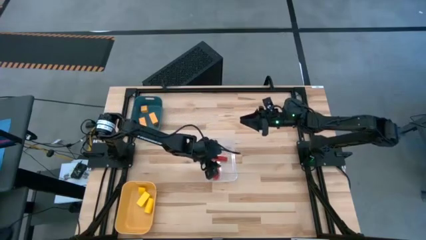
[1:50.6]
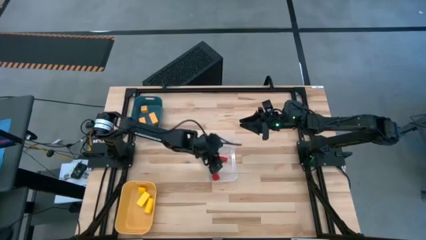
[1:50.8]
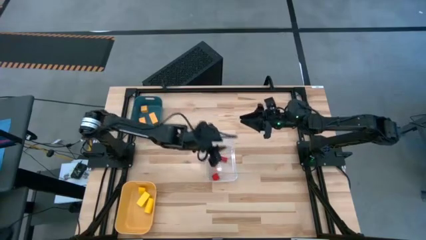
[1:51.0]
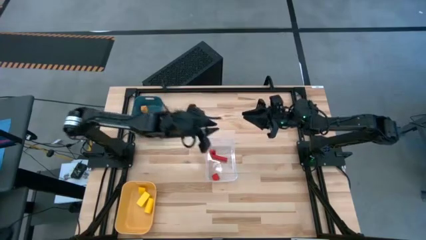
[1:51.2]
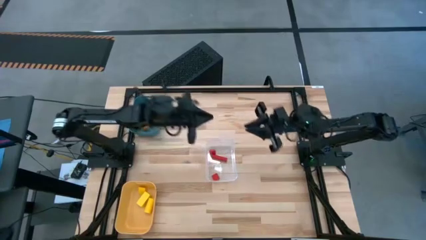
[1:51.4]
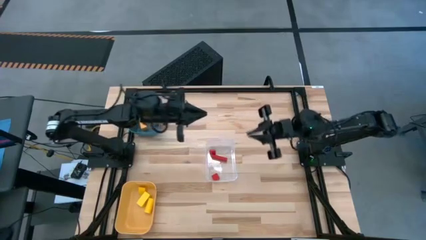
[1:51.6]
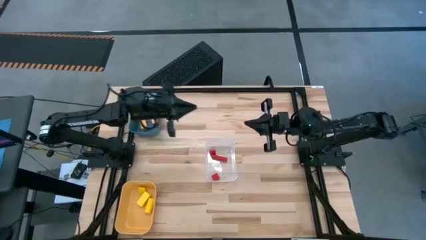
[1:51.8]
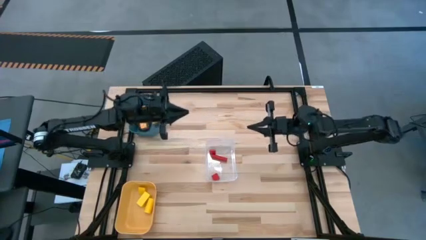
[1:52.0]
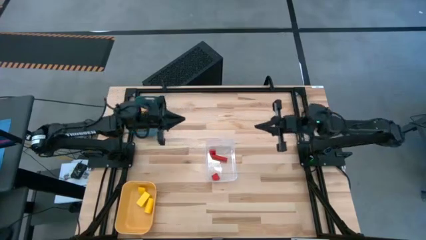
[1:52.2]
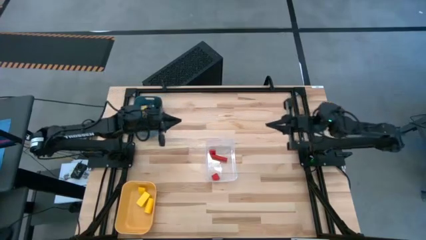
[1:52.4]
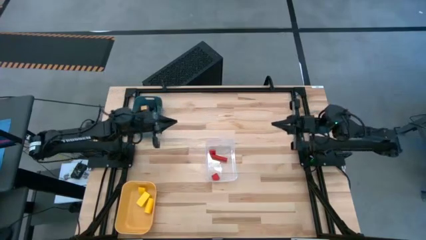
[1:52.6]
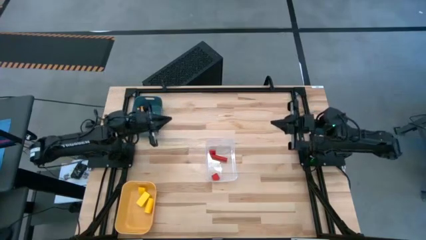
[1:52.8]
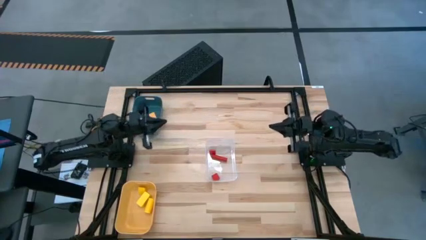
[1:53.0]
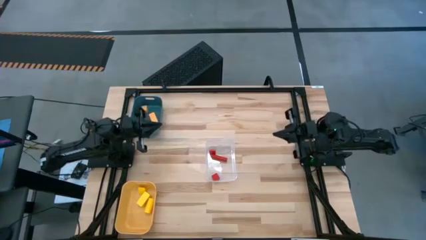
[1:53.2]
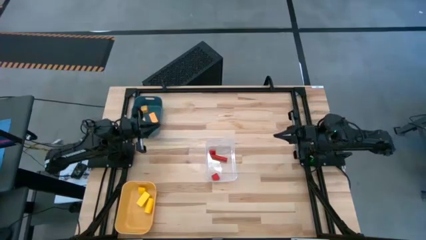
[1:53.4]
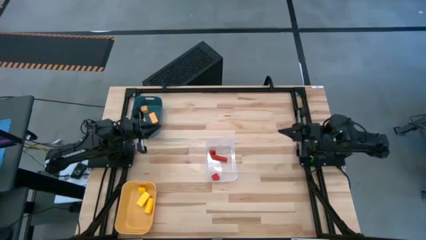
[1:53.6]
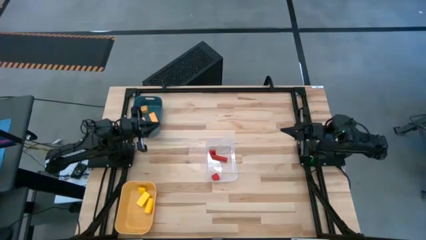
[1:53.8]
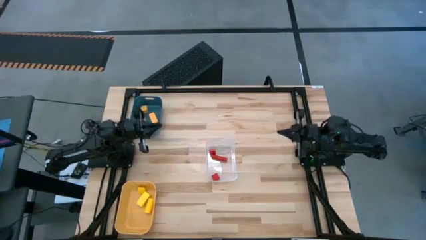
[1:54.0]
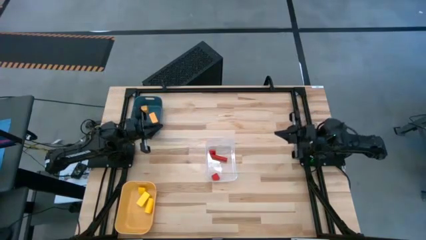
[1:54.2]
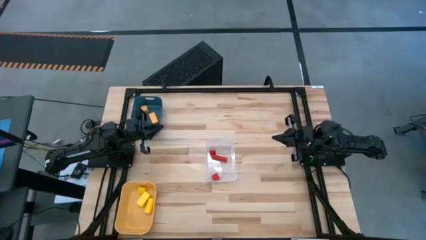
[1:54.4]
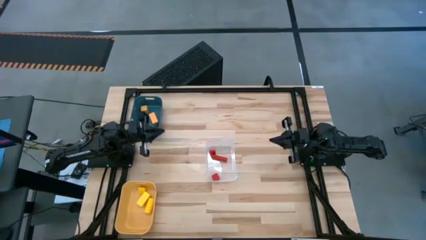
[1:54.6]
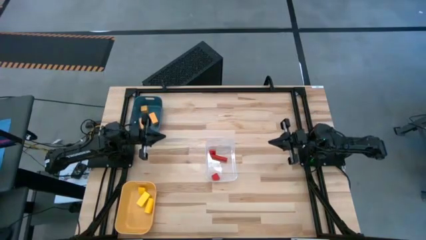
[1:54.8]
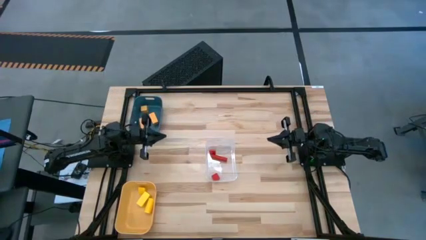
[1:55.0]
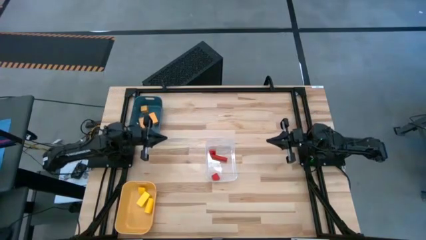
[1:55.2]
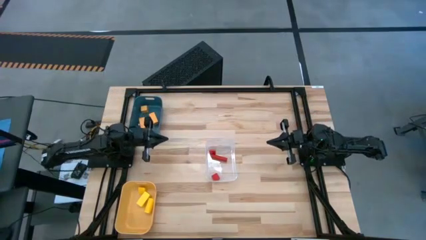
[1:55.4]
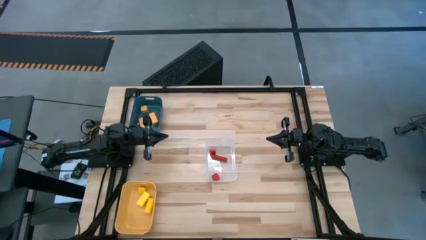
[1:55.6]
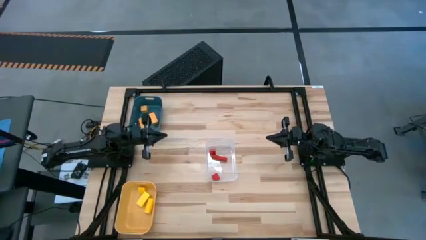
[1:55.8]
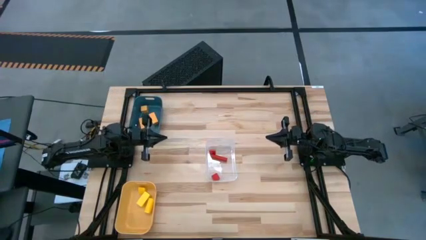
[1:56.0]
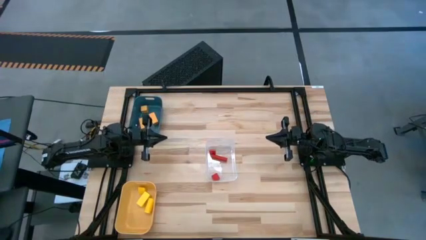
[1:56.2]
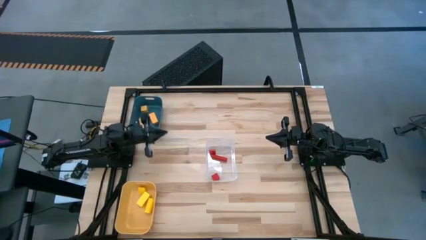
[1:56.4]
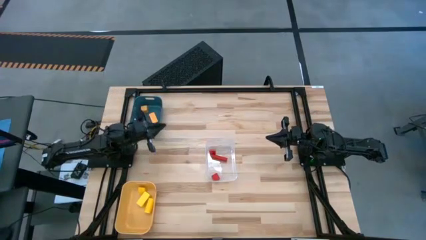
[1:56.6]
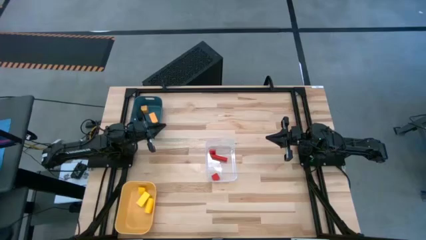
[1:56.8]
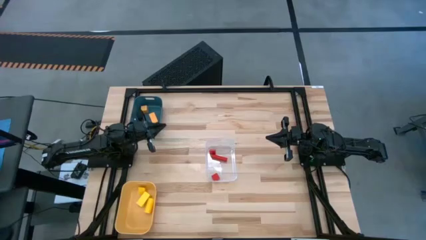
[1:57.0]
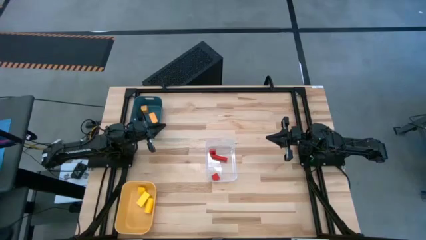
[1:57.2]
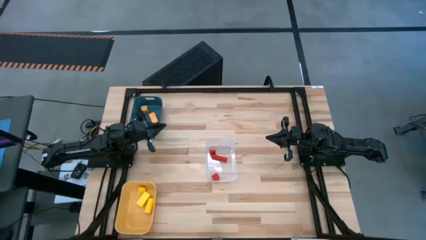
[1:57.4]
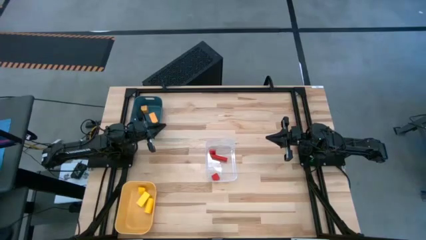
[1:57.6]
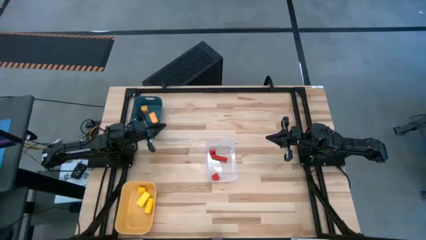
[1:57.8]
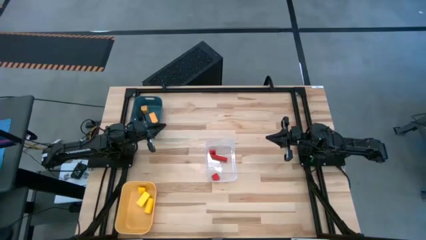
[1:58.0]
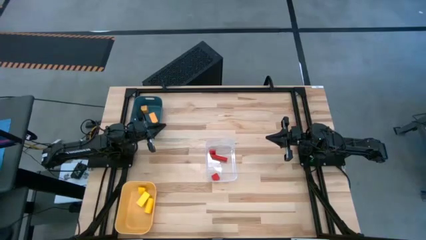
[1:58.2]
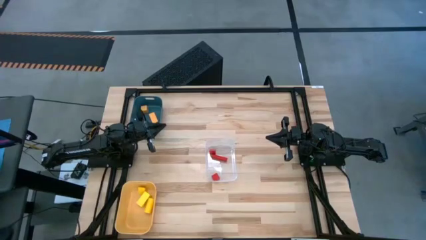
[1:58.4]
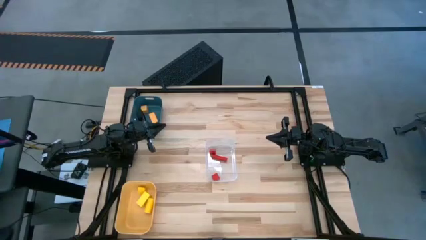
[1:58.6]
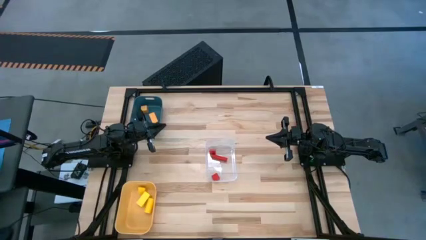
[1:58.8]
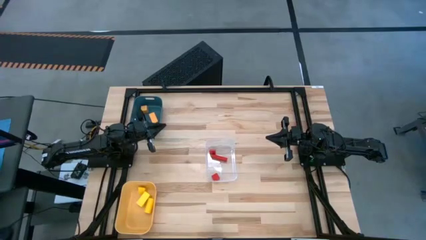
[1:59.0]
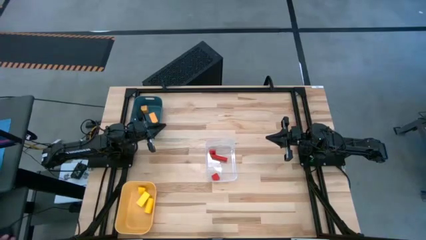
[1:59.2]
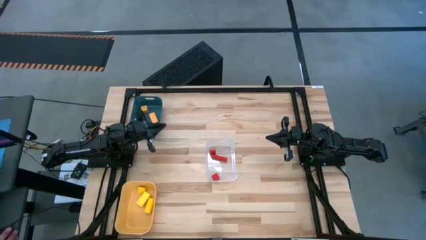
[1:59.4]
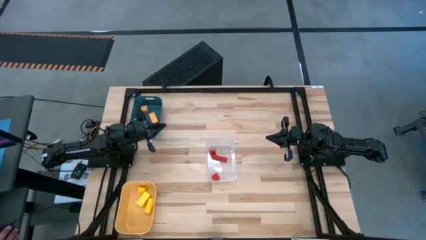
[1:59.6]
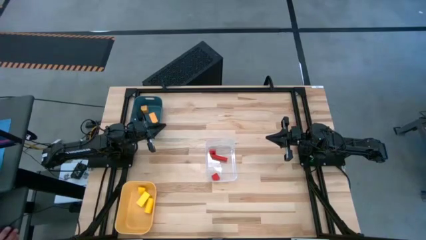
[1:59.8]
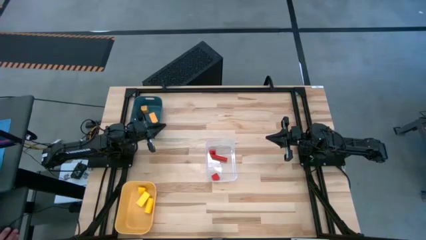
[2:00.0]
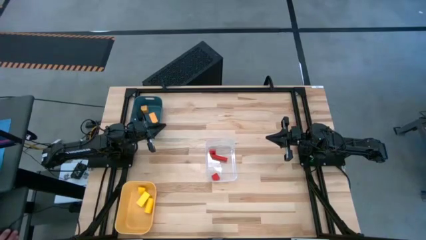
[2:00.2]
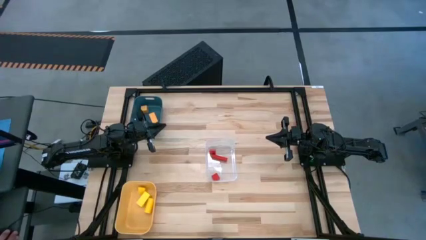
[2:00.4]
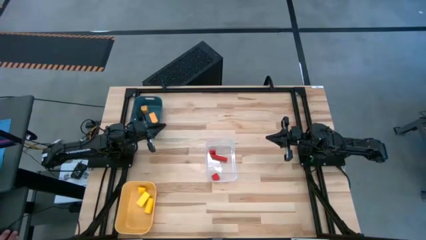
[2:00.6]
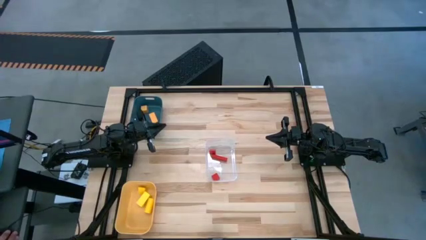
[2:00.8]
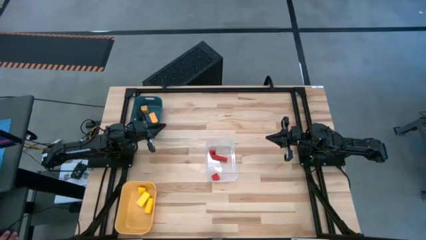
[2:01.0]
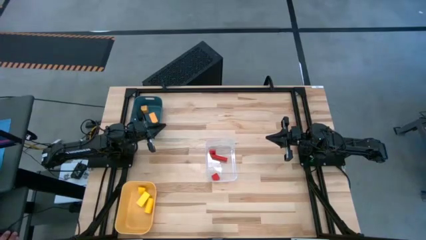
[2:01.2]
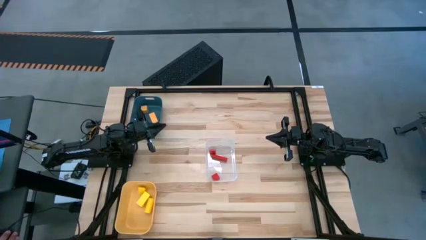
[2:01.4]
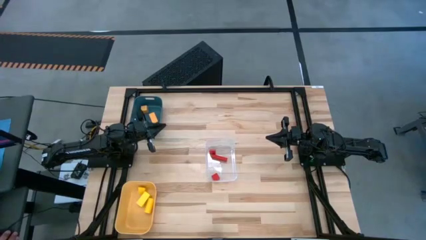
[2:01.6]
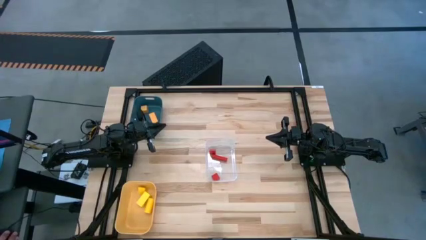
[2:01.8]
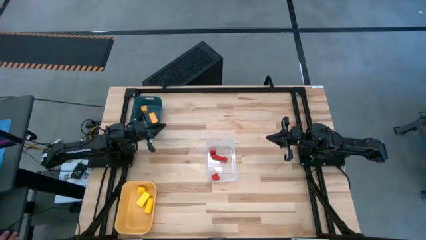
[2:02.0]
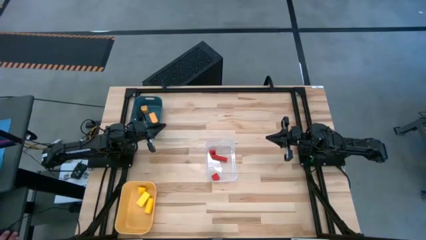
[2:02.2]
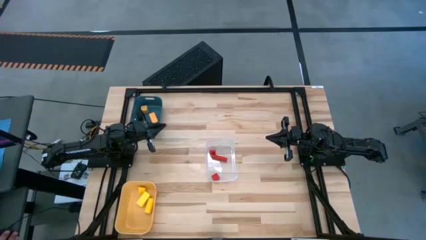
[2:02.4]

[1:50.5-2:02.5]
Task: Sort & place blocks by color
Return to Home Position

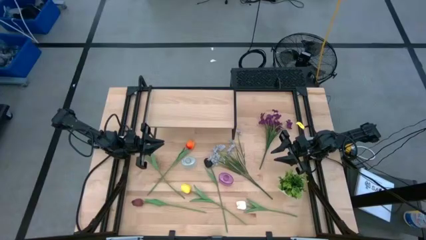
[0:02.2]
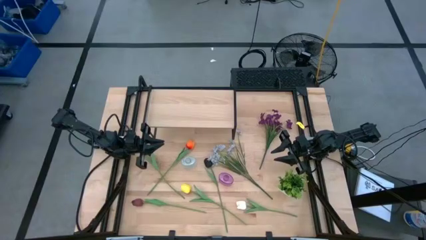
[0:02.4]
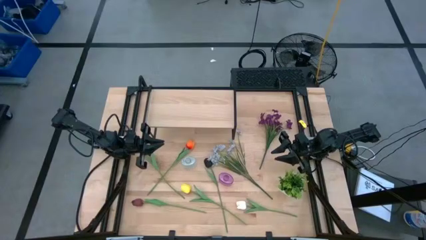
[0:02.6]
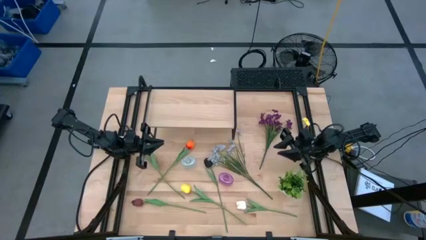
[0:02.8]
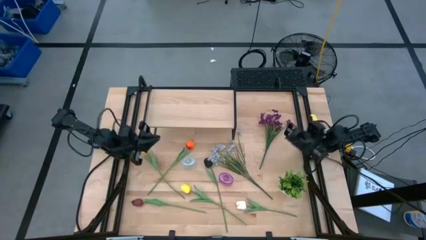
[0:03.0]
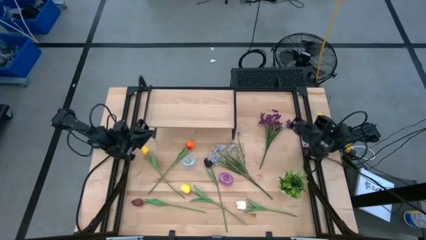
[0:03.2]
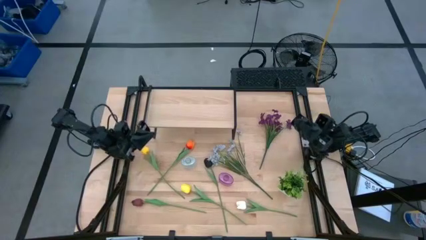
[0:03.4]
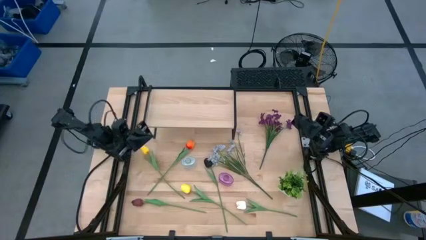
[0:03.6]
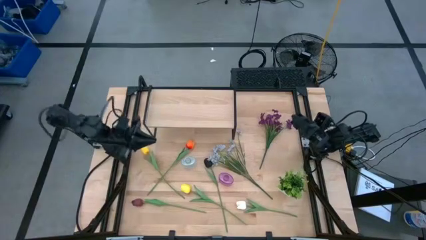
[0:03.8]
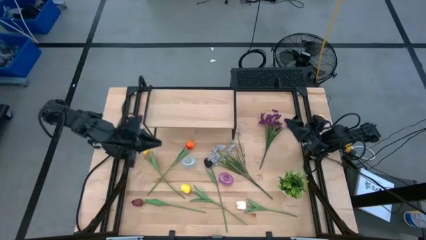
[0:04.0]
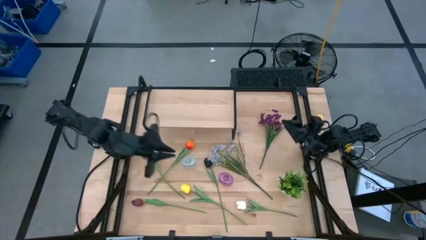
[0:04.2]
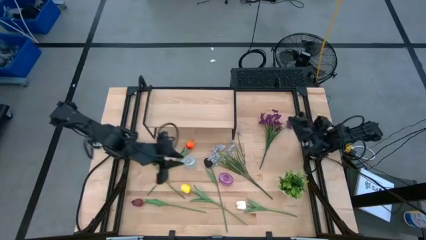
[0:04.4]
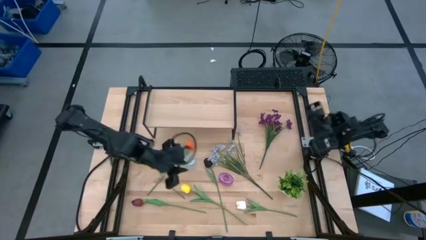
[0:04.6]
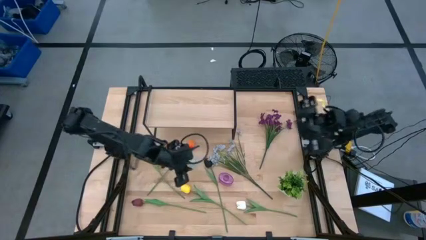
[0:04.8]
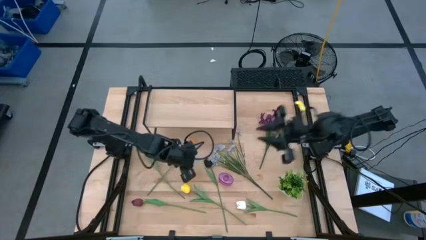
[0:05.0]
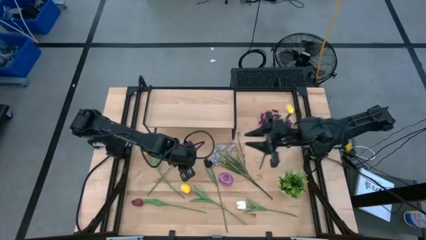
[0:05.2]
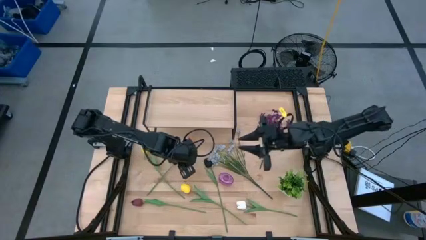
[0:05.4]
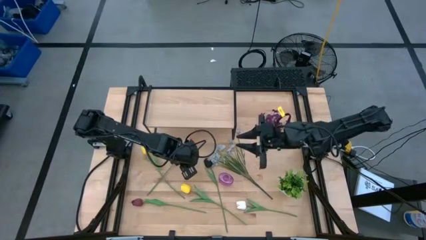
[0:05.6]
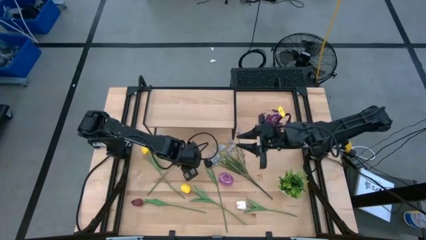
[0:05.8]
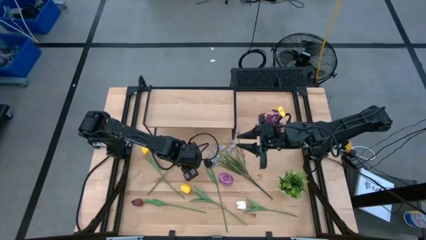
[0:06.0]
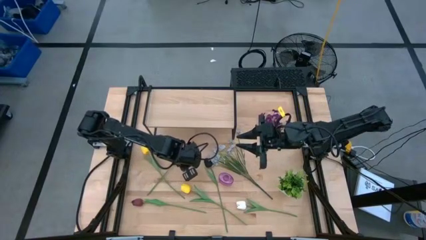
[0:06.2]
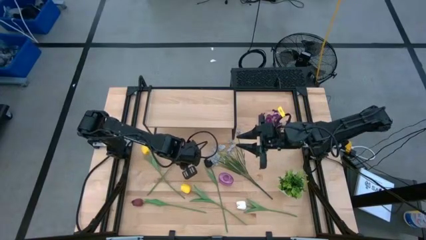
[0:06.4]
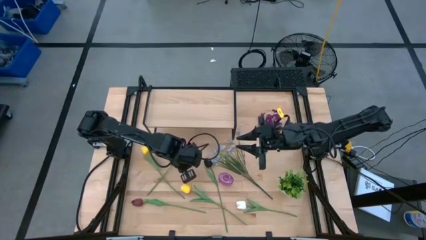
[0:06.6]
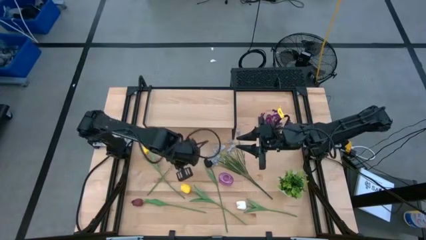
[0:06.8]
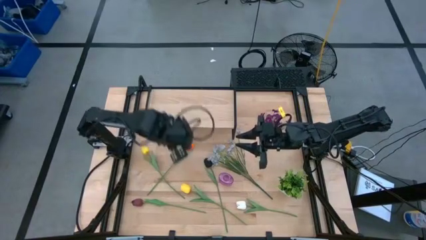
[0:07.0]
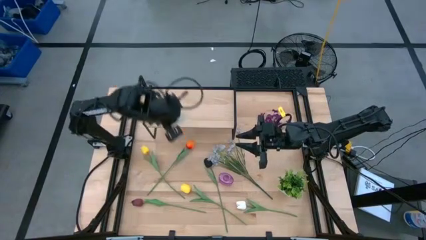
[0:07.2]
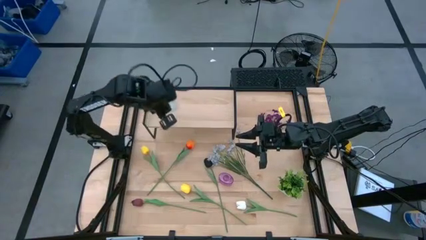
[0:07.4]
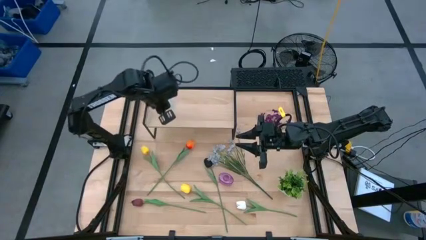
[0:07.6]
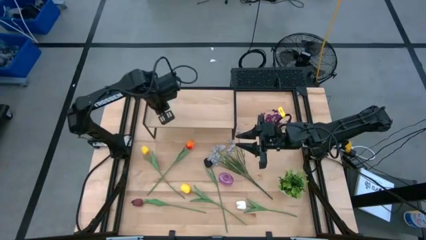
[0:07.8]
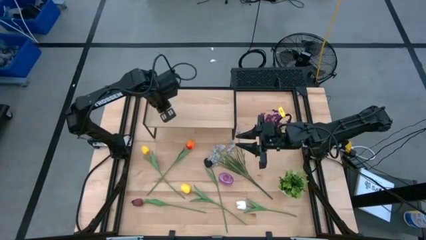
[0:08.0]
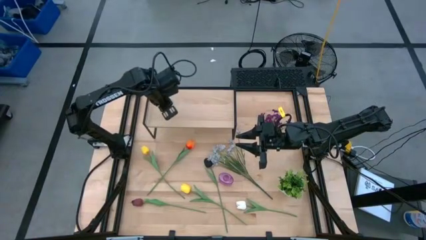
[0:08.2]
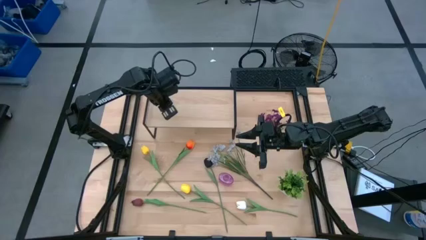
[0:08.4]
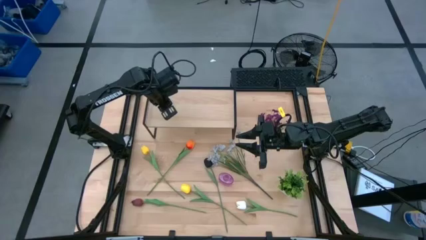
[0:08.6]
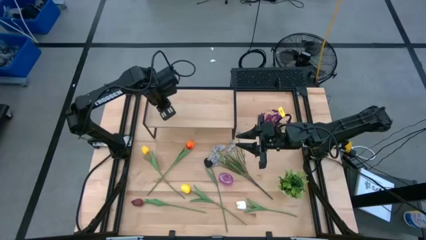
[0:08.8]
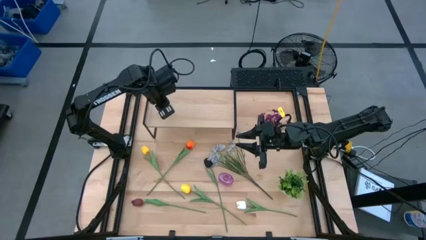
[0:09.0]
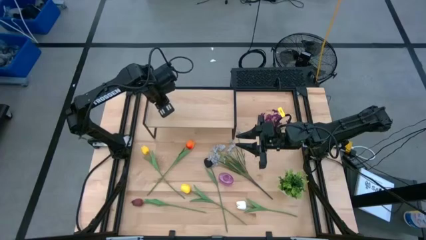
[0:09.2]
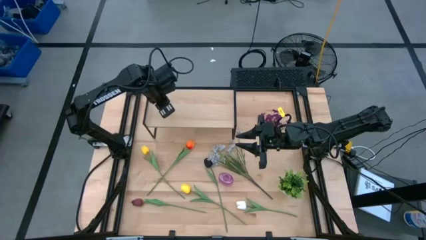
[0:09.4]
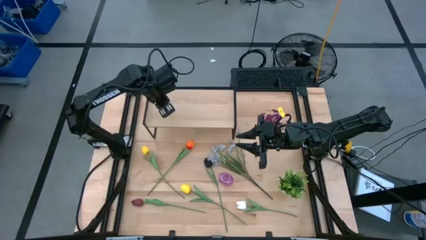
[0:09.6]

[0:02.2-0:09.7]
Task: Pick and place flowers into a vace then onto a shelf
Put the transparent vase on the shelf
